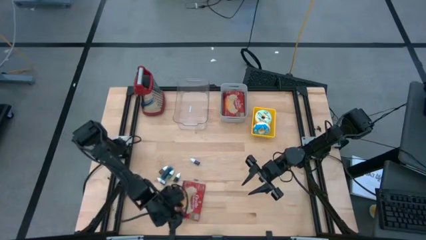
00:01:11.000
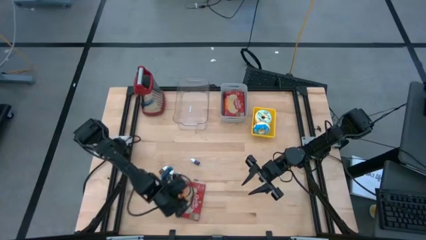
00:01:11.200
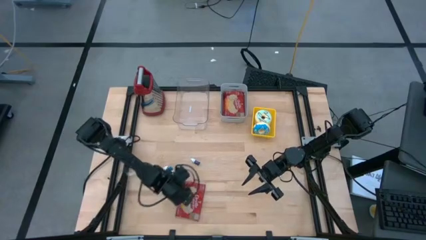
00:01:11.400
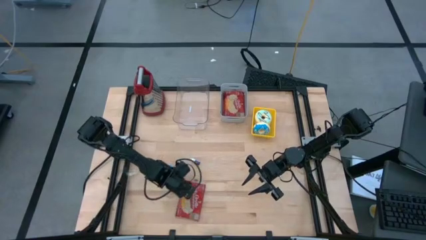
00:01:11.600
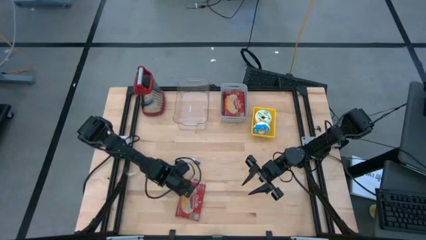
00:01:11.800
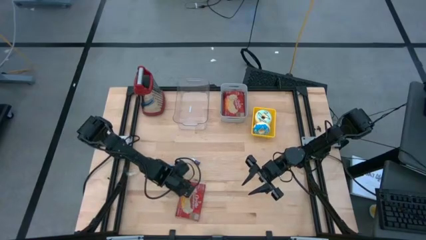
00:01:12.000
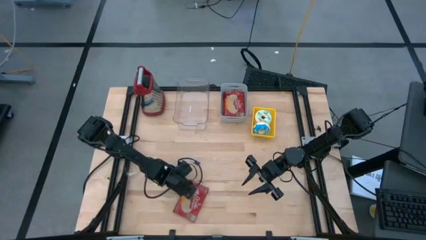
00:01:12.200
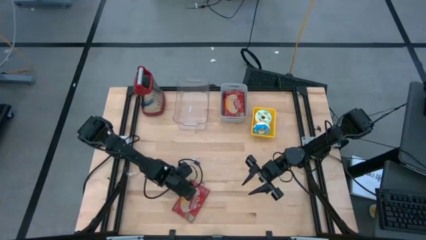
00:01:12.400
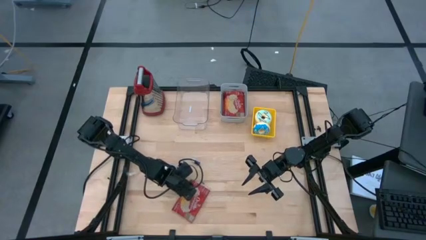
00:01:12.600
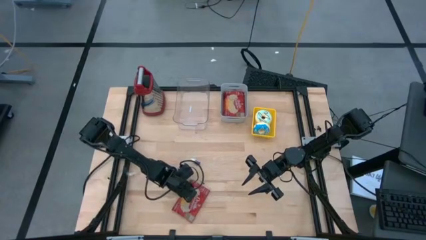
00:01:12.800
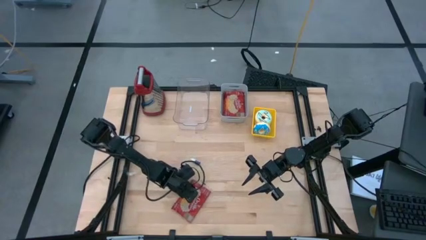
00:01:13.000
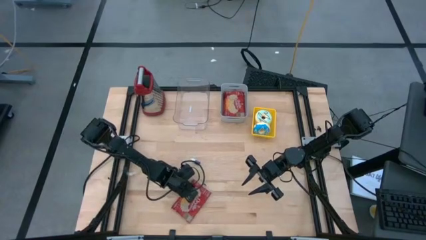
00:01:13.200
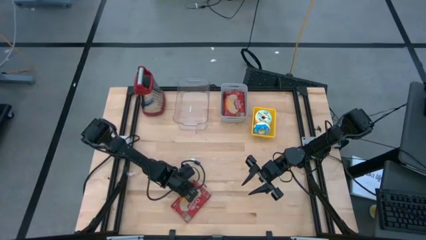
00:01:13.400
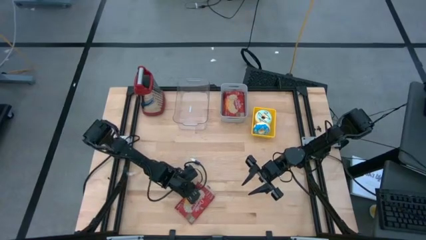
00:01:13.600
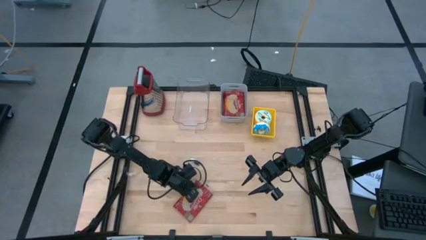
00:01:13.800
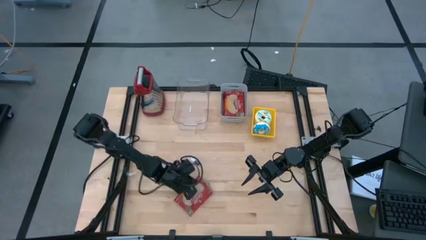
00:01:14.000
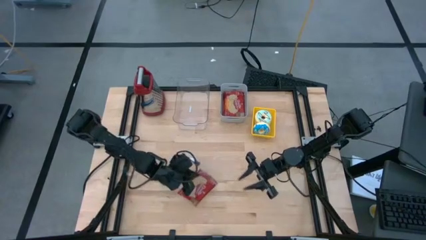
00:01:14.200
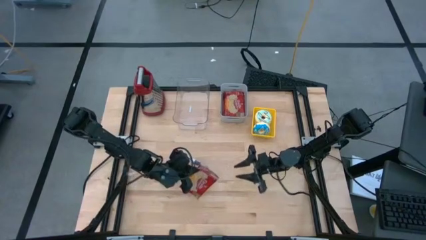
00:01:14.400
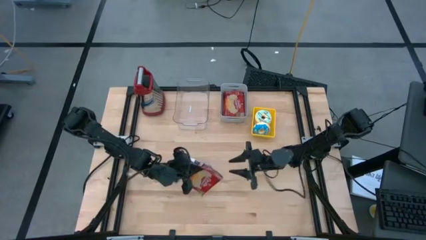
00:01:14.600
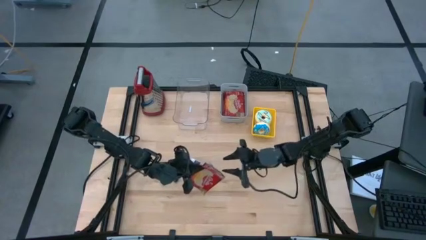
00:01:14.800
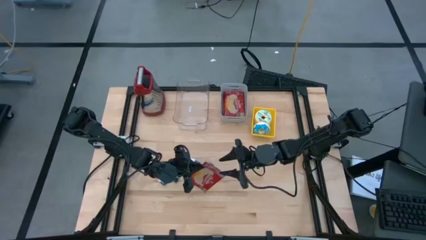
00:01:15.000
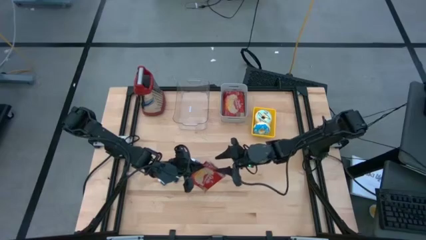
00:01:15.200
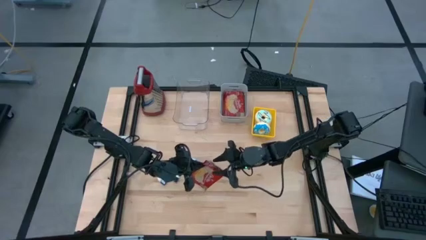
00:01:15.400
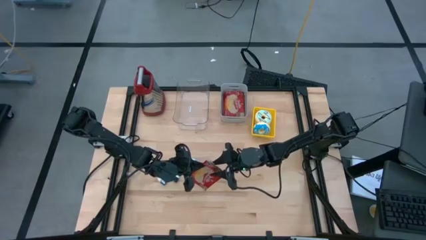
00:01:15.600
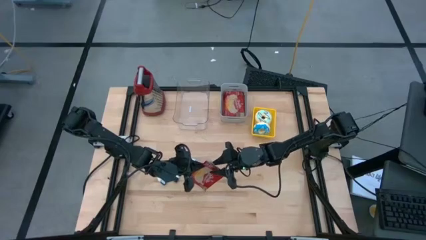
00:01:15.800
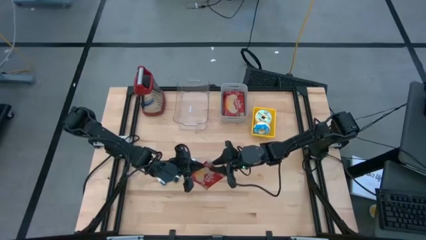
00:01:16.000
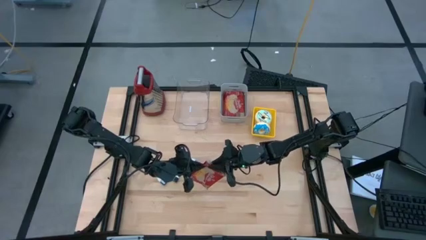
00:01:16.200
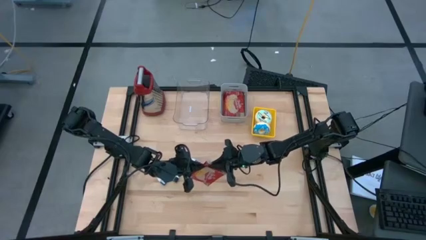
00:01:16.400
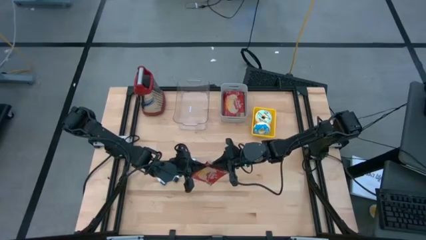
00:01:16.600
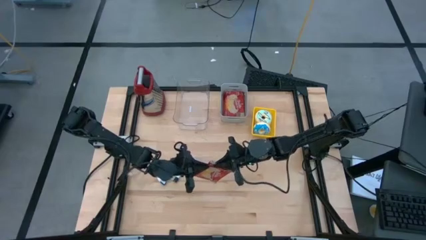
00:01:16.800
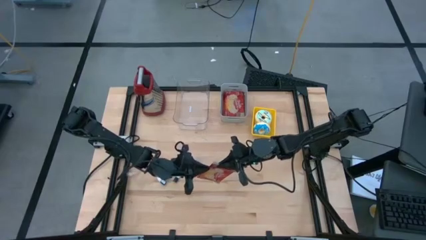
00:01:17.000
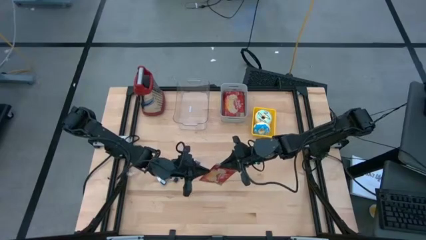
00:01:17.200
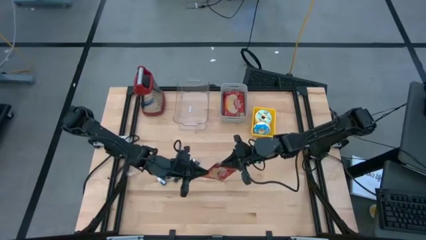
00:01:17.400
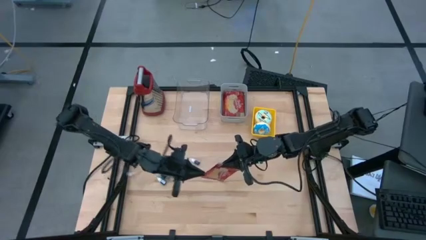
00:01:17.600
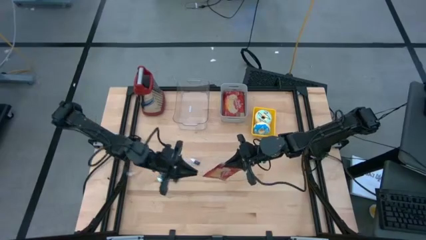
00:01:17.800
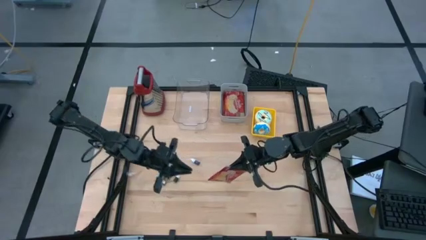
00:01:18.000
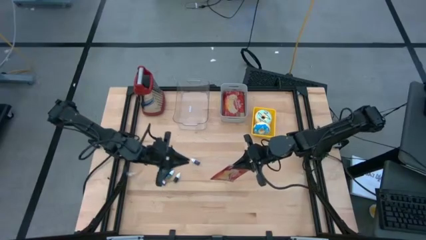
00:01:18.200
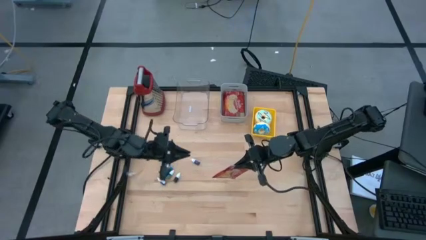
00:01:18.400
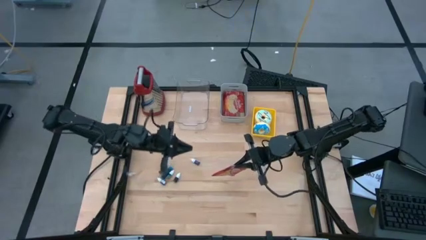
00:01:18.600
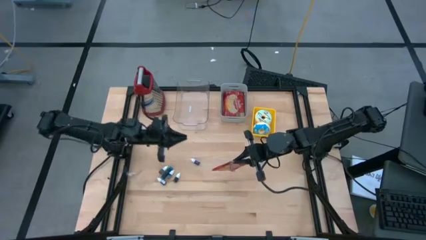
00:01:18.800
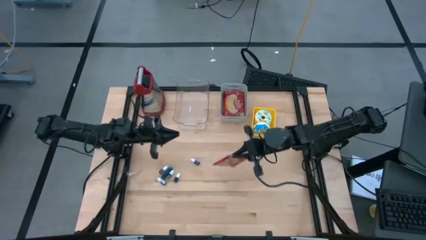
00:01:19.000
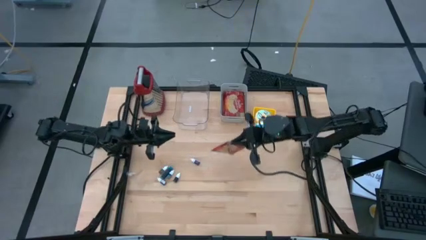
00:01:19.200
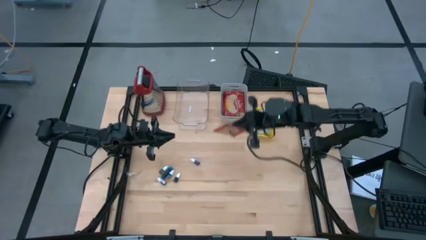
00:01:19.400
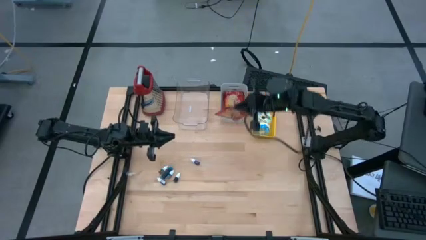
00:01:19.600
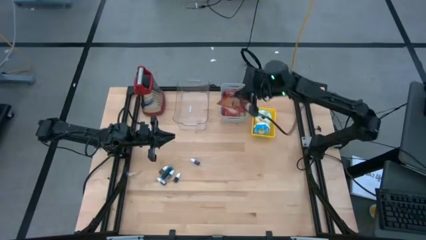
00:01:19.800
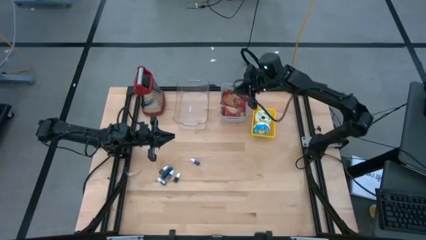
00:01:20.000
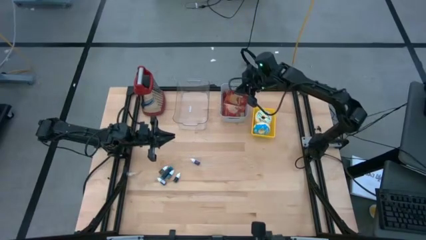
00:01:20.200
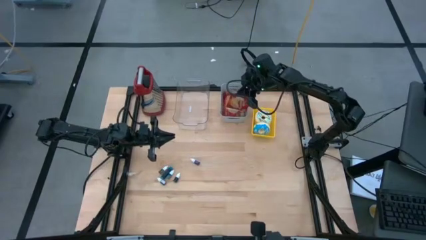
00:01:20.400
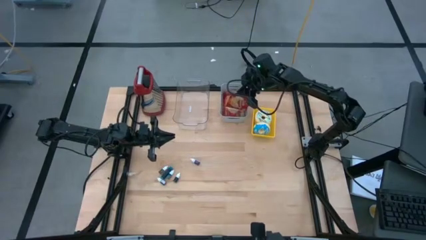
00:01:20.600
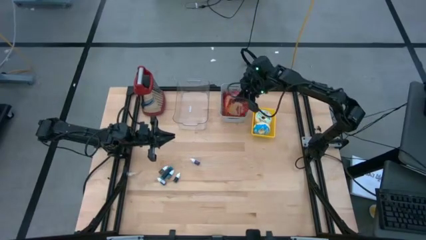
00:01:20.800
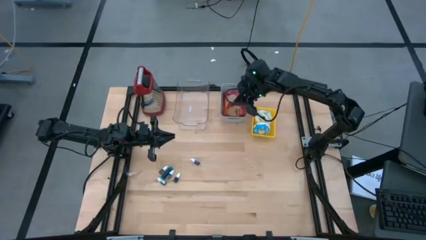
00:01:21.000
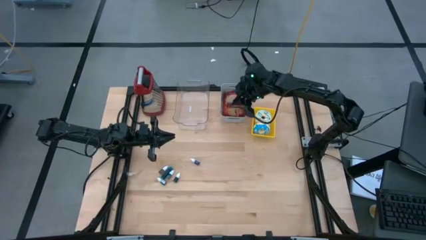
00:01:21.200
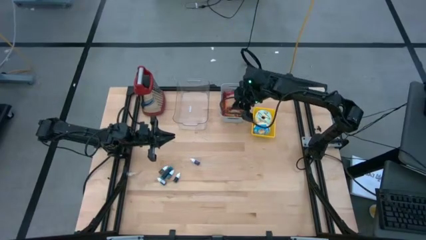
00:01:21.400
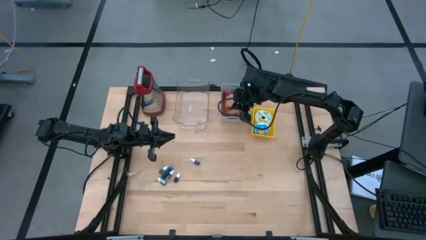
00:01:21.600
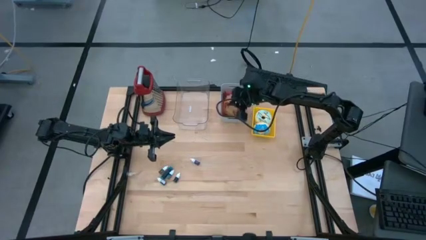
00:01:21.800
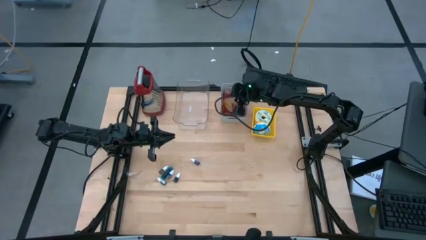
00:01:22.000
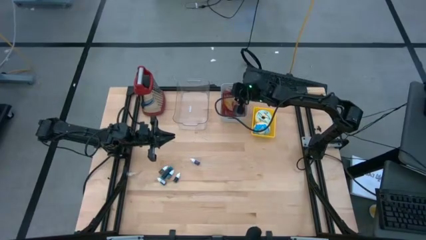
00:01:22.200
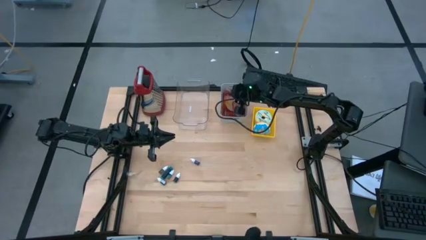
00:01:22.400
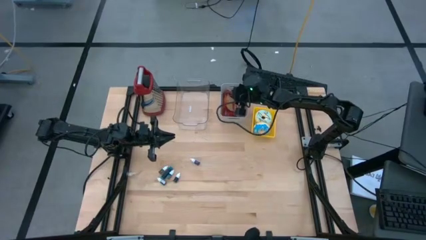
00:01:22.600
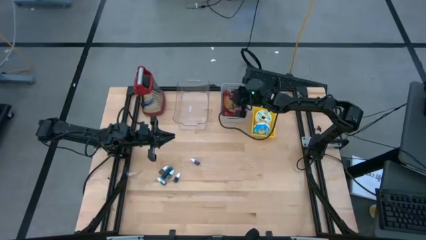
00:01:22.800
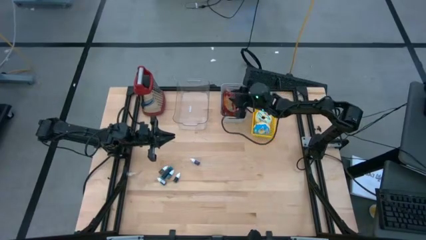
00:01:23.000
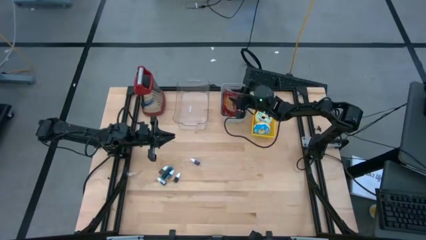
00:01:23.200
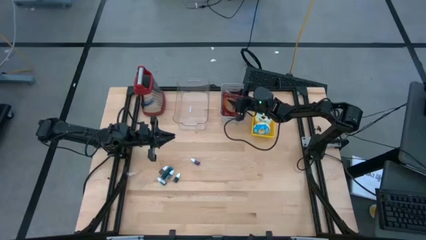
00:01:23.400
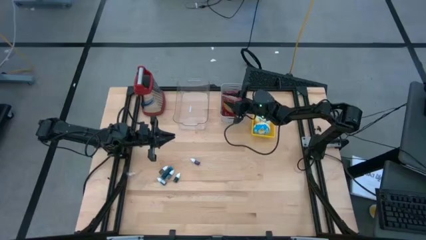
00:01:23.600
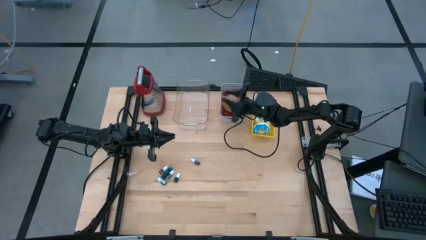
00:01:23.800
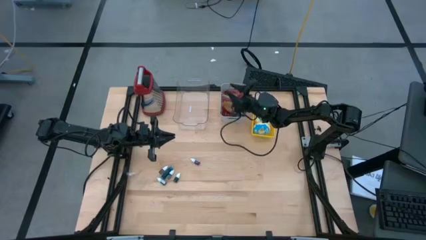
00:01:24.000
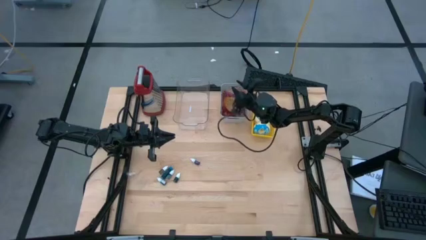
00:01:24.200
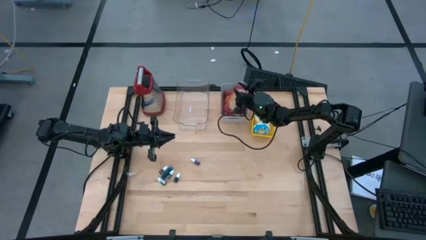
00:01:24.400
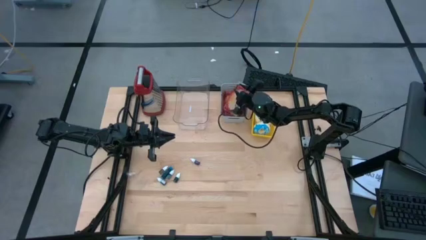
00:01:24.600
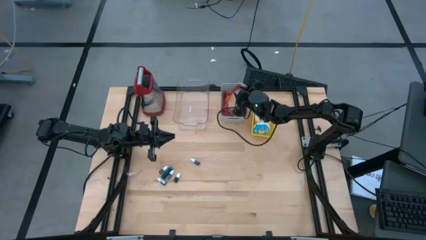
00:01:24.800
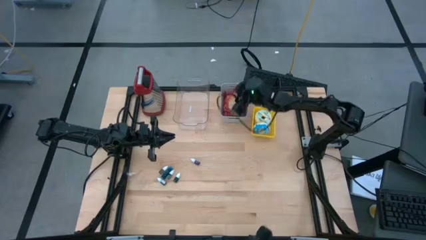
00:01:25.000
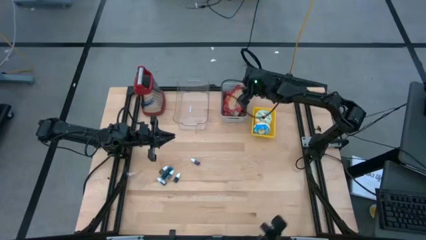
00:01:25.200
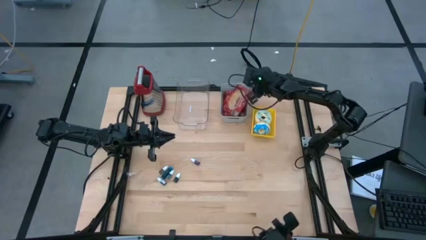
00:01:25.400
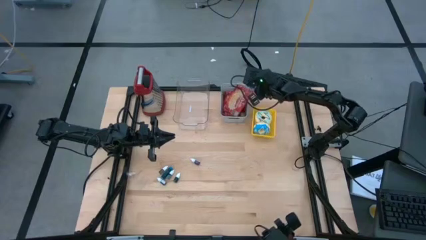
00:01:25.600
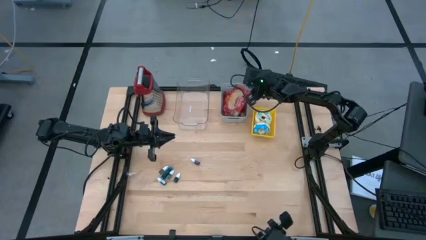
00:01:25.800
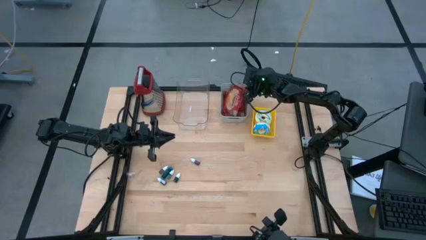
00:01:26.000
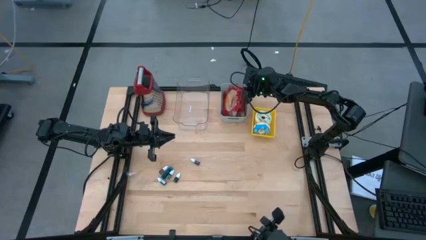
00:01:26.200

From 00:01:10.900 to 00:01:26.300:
Task: Pick & Place Food Item
Put the popcorn bag into the gray bin

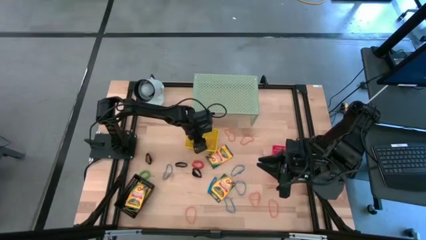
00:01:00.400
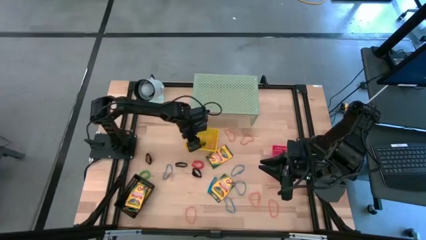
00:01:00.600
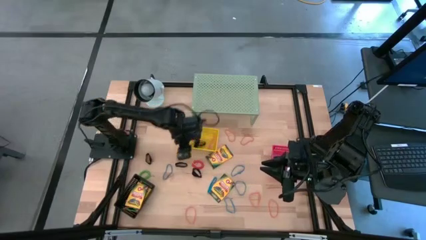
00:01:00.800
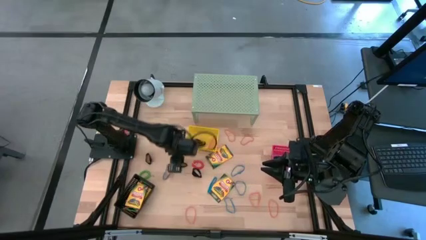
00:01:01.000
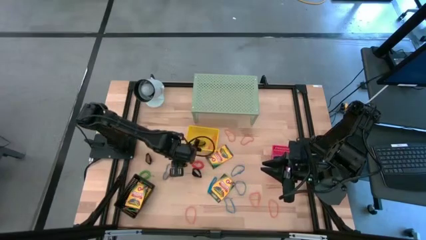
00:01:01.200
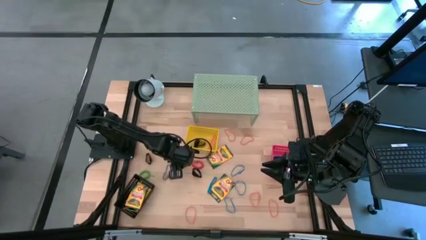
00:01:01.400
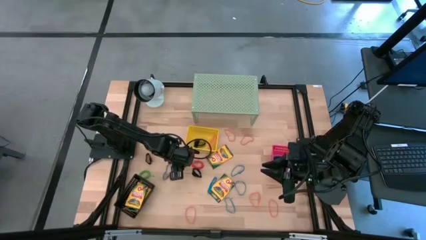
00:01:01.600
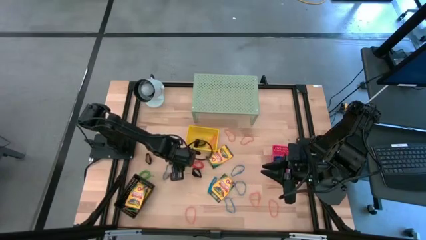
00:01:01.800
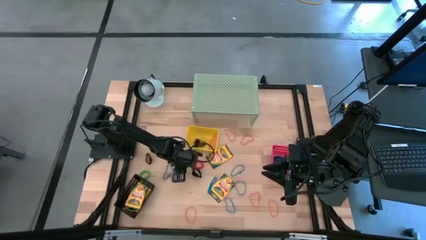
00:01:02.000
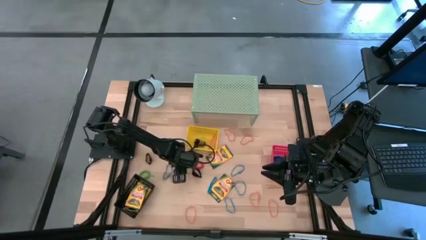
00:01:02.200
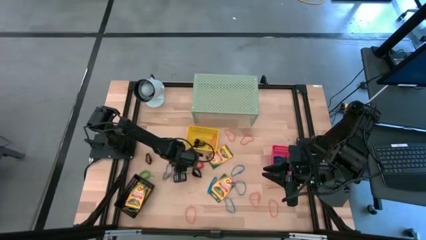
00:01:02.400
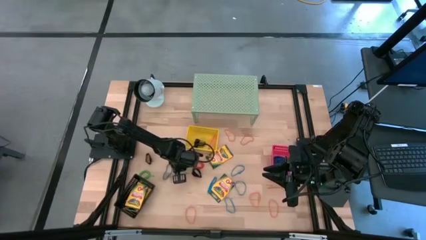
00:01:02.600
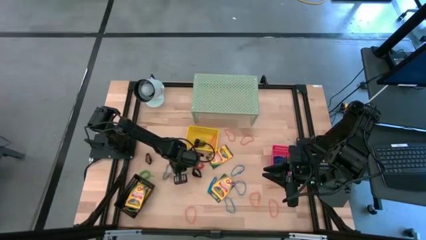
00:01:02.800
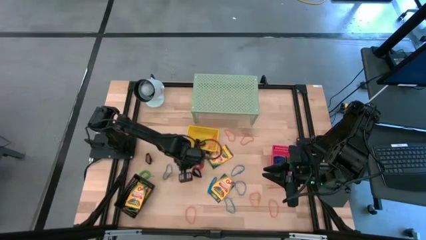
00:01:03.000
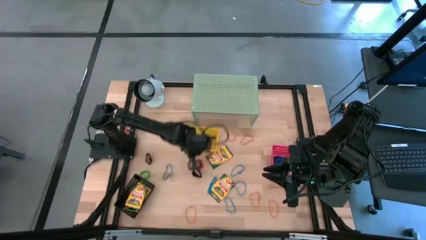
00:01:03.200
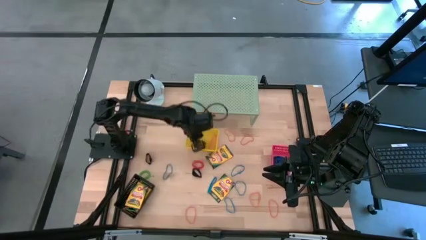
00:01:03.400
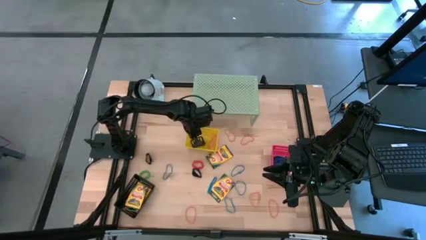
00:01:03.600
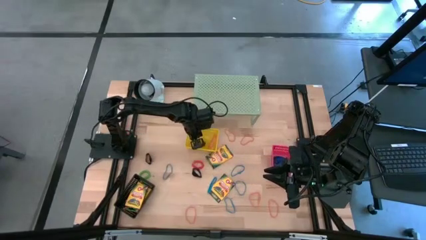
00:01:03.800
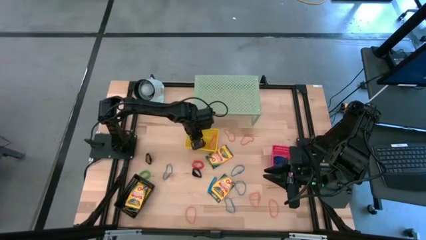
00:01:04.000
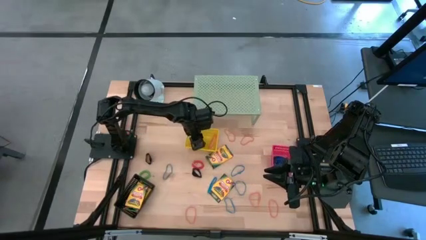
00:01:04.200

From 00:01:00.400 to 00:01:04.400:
Task: Pick & Place Office Desk Supplies
Put the black rubber band into the yellow bin
